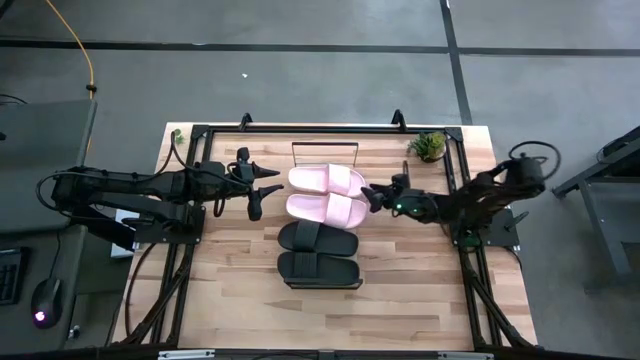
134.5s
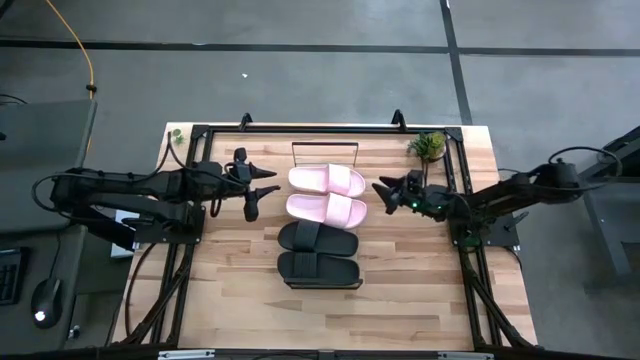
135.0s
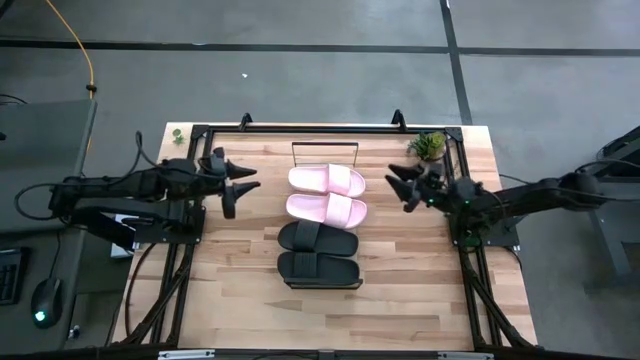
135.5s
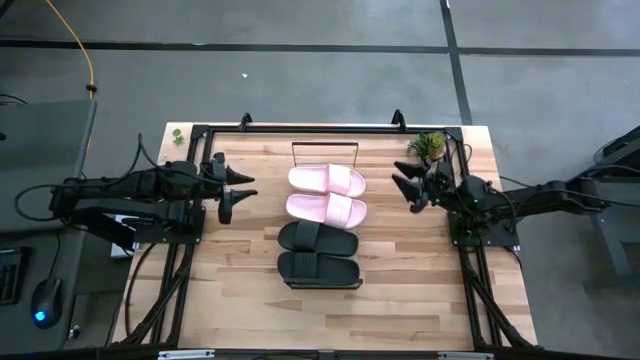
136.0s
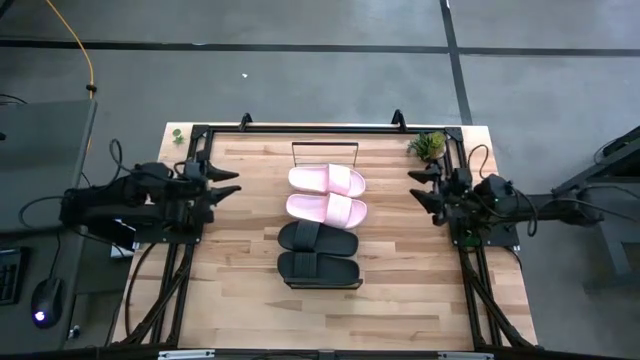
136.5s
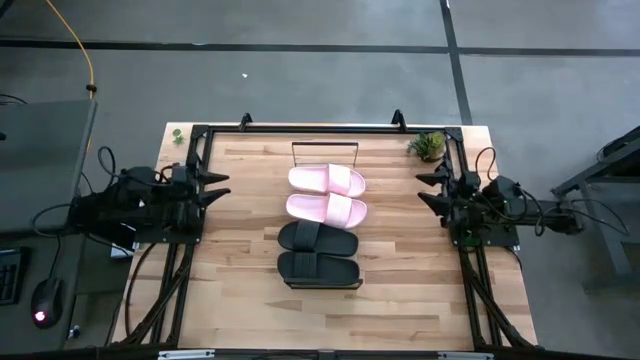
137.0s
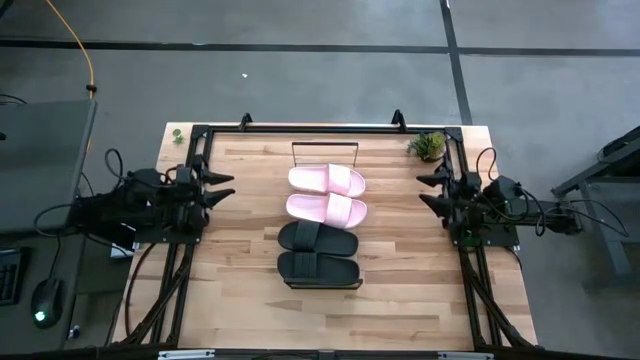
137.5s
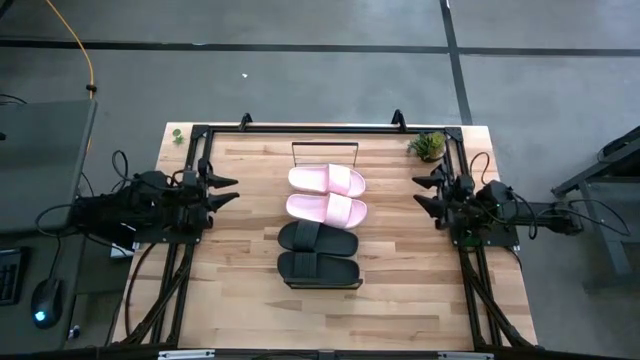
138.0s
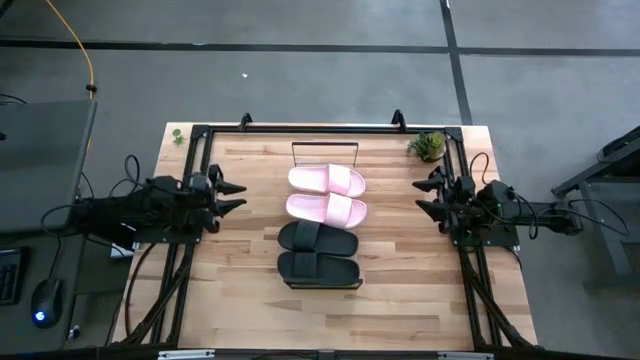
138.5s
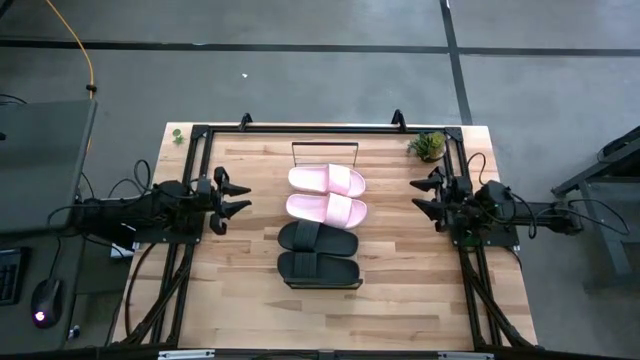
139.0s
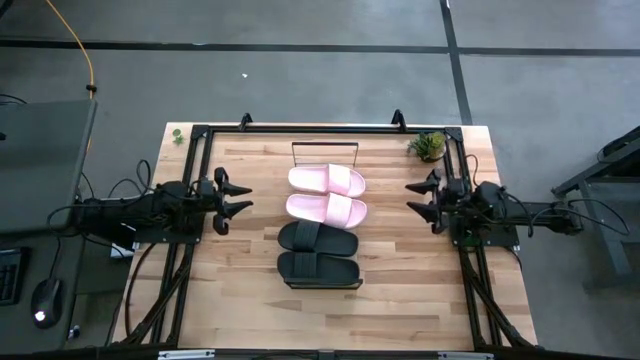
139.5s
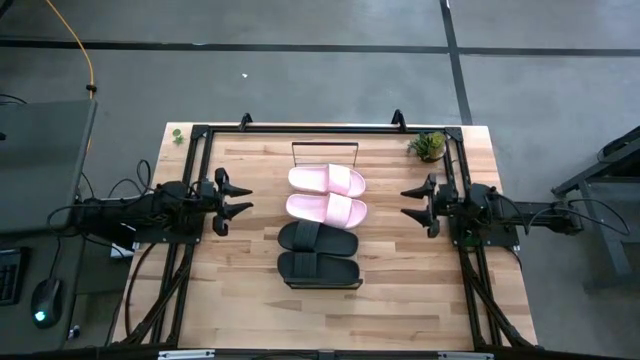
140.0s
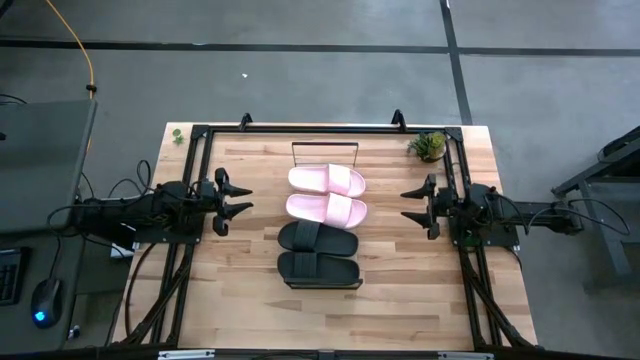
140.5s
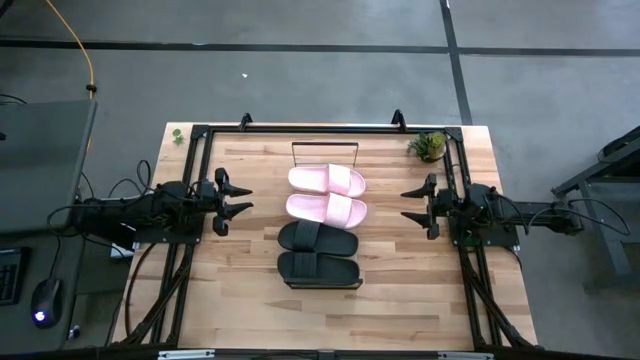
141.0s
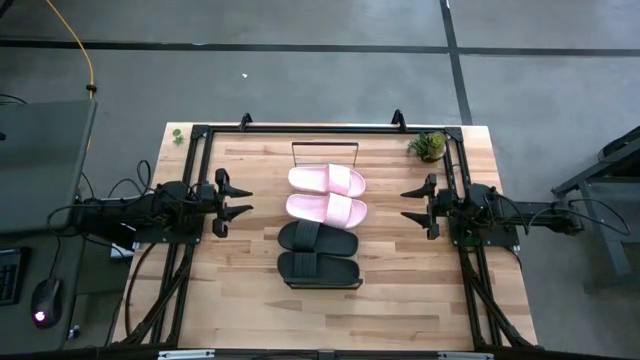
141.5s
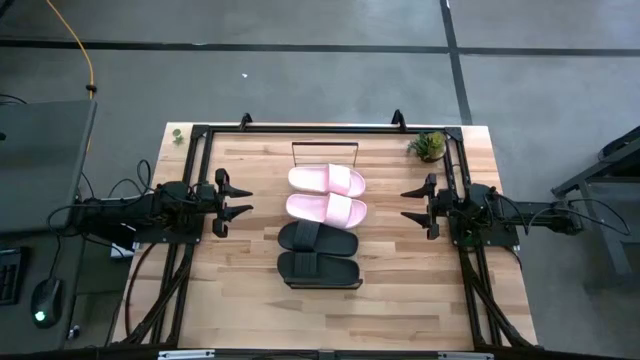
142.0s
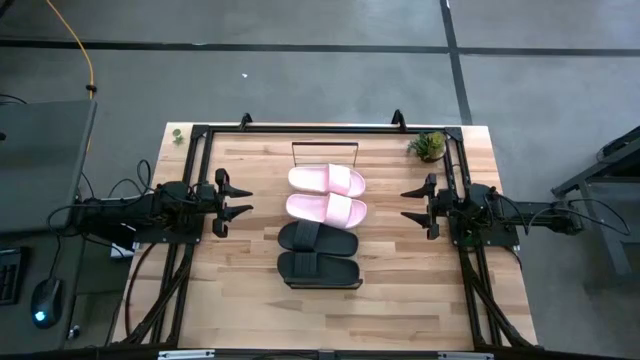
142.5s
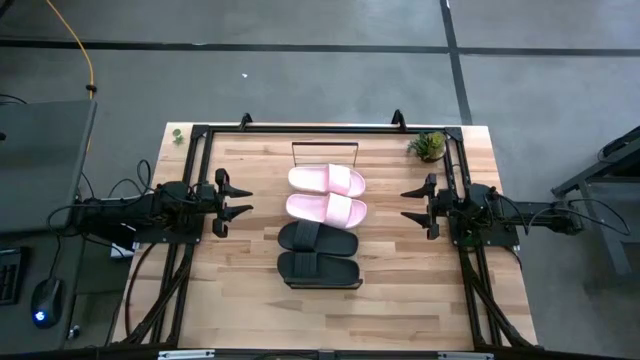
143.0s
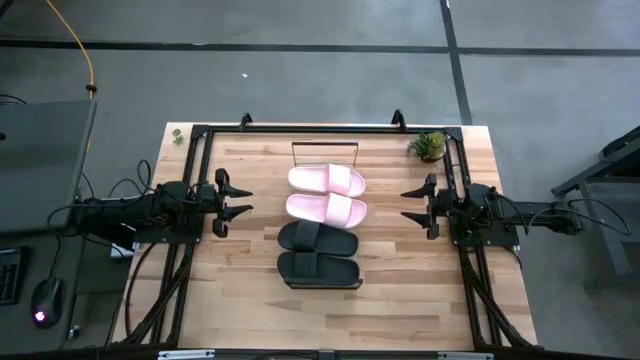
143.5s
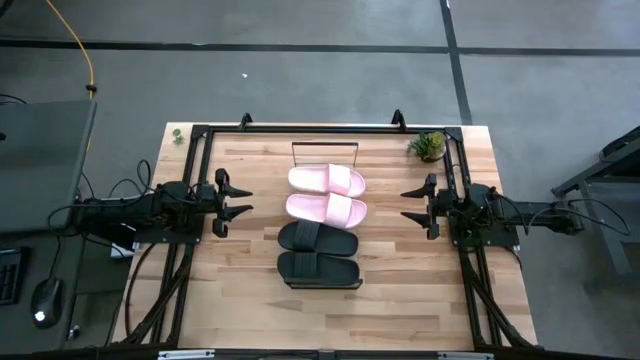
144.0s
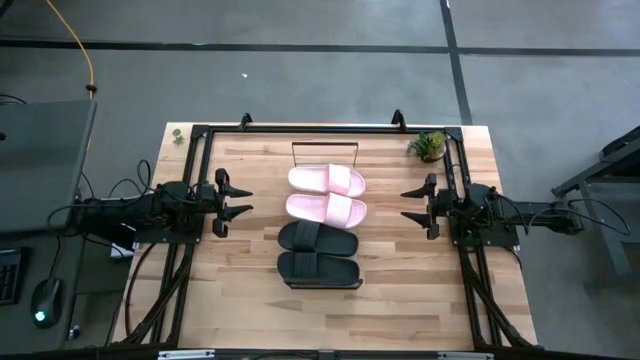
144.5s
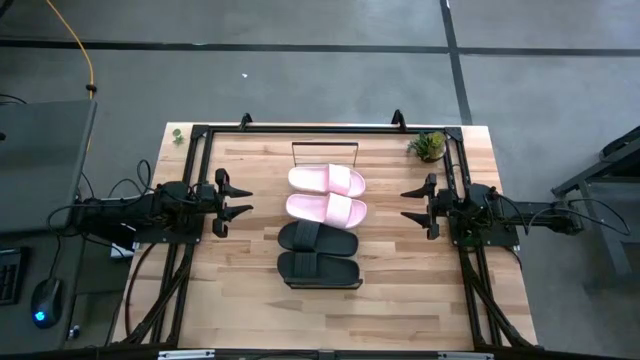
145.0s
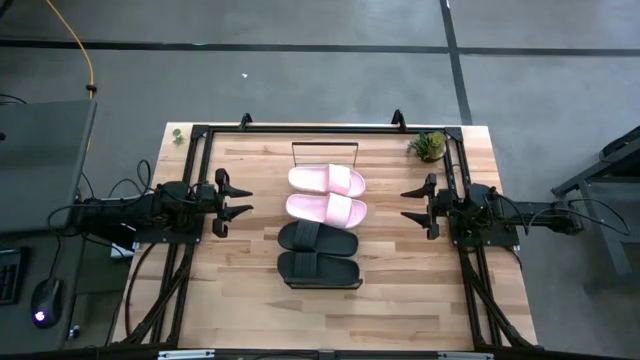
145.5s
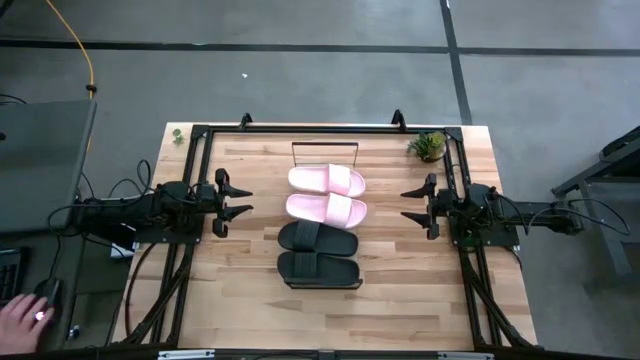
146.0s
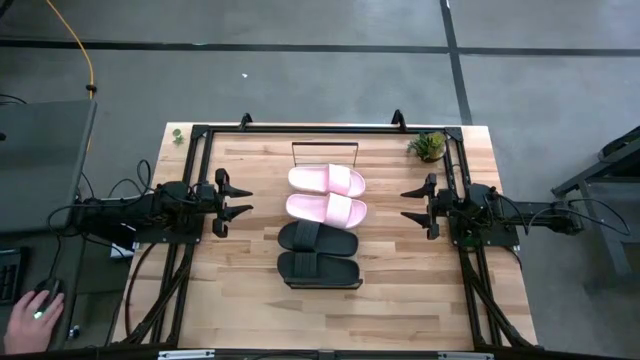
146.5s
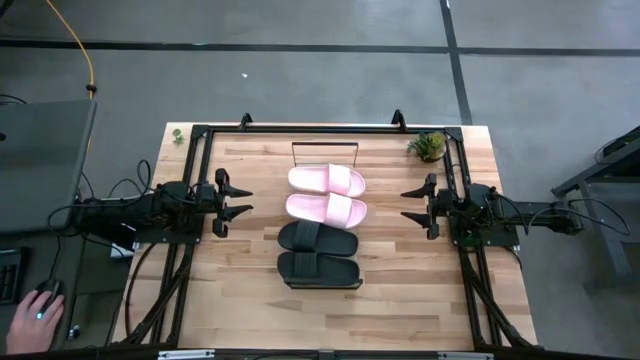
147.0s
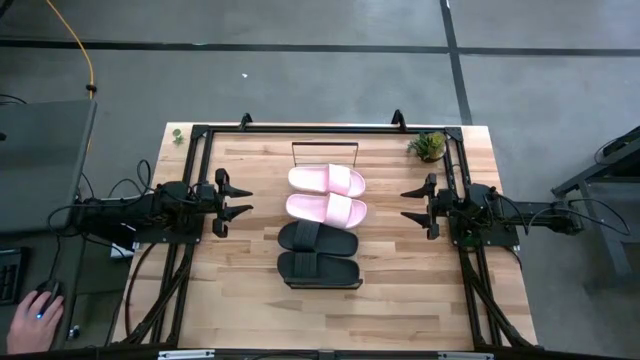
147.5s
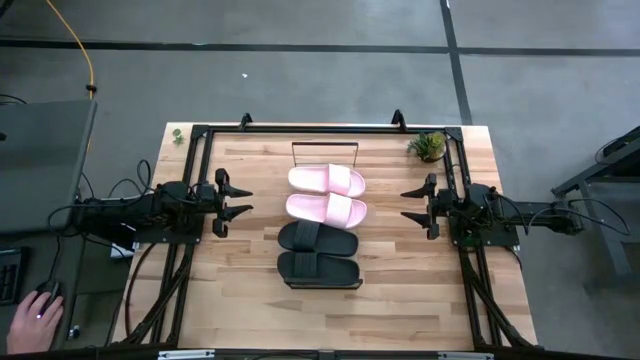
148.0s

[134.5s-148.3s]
Task: Pick and place slides into the shelf
Return to Home Position

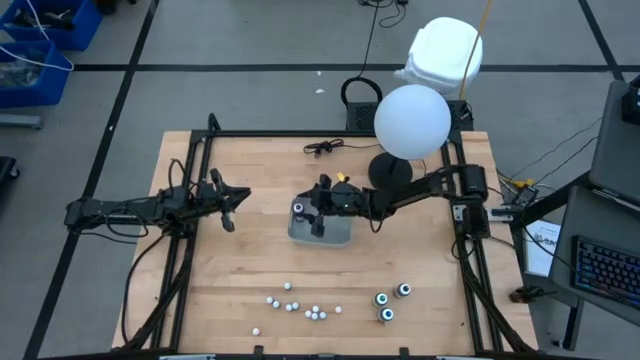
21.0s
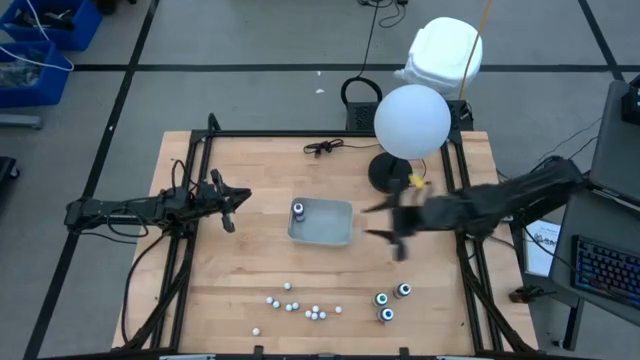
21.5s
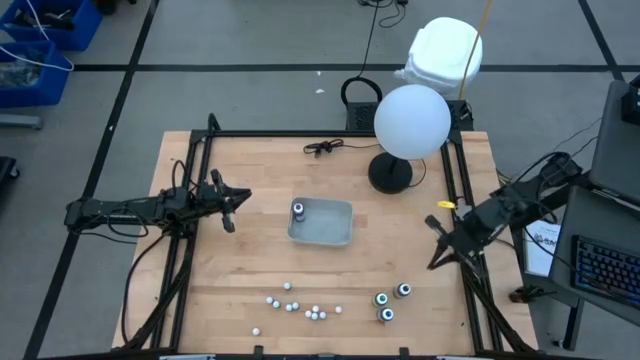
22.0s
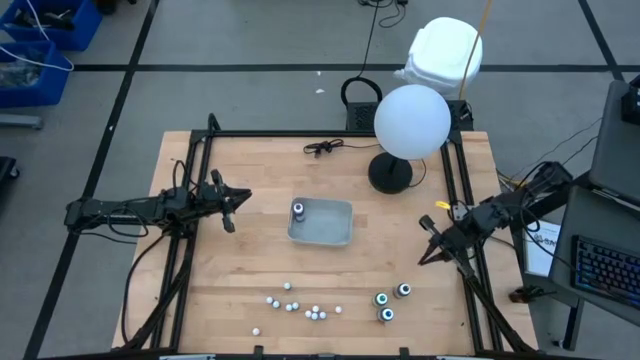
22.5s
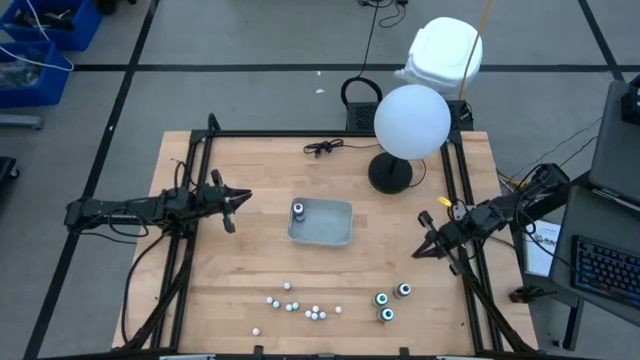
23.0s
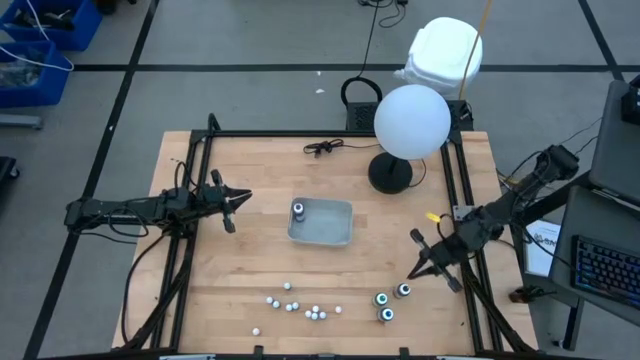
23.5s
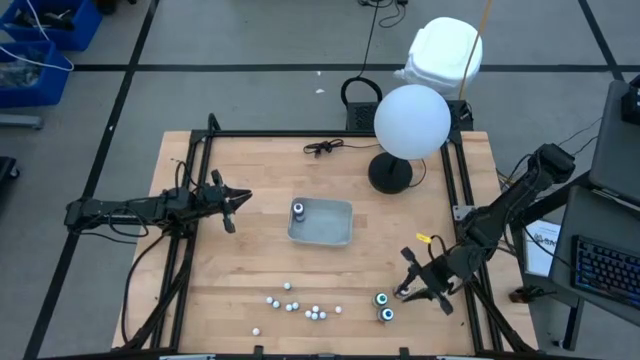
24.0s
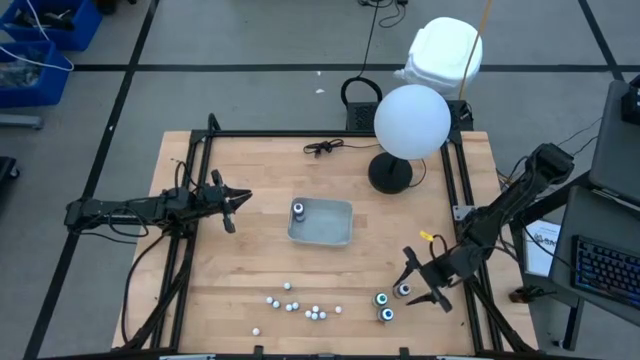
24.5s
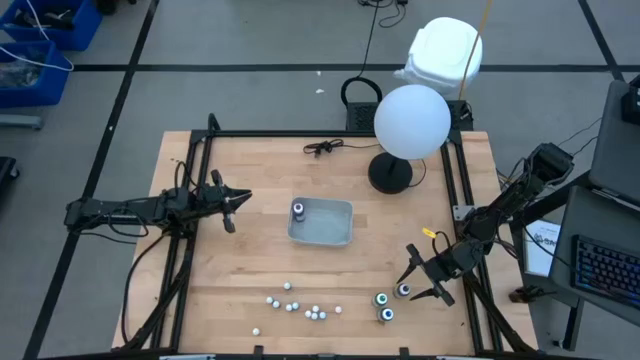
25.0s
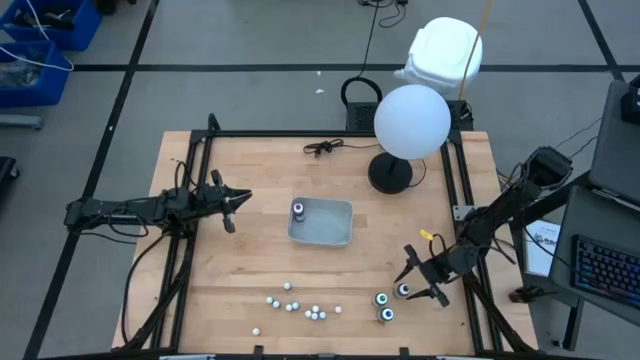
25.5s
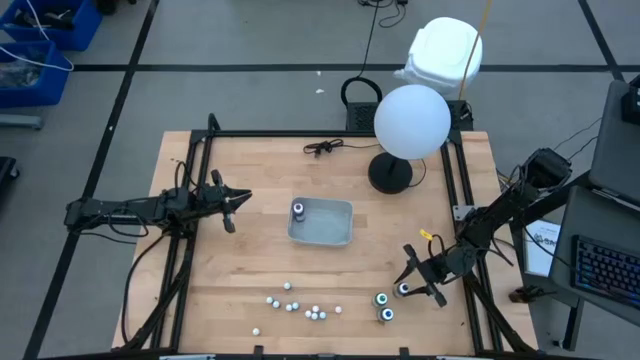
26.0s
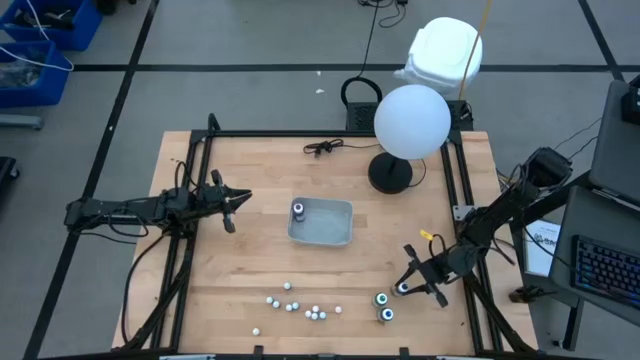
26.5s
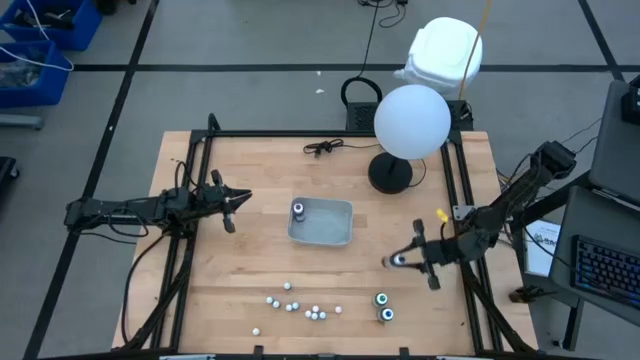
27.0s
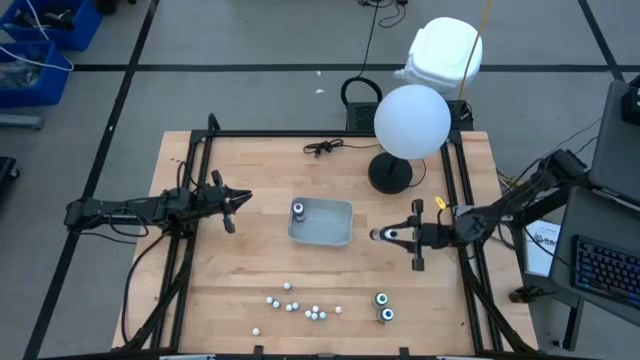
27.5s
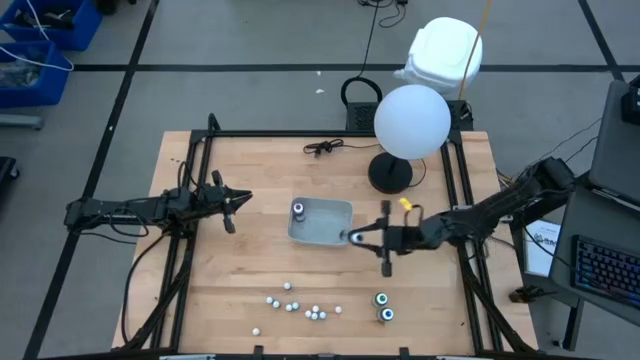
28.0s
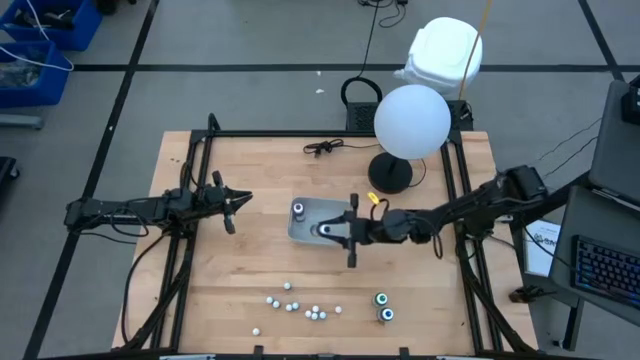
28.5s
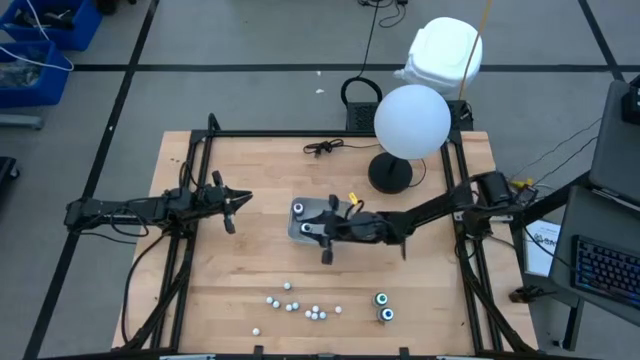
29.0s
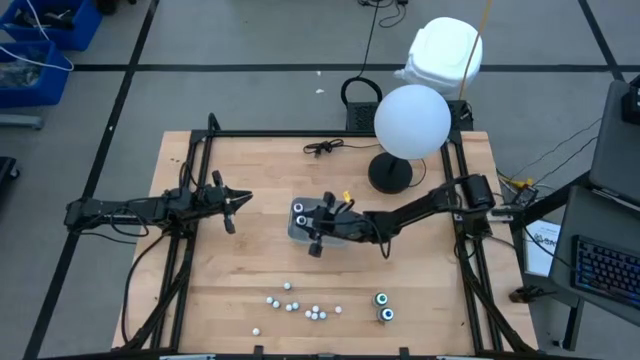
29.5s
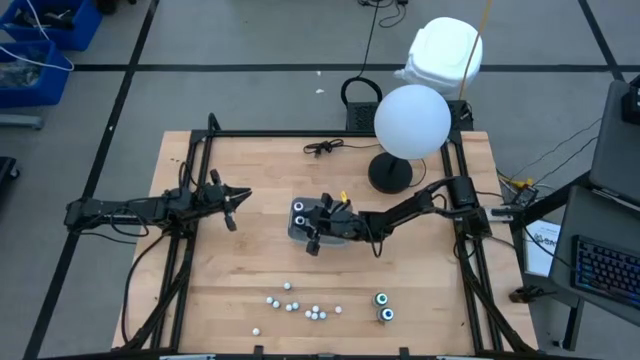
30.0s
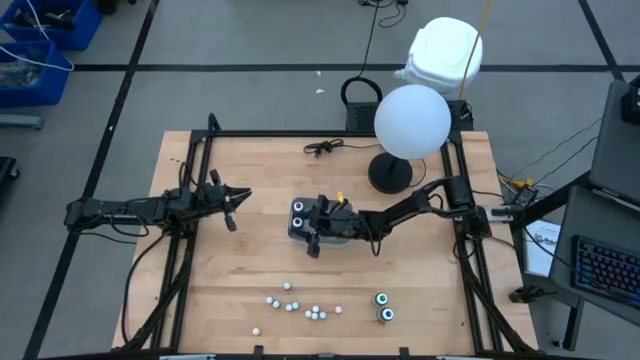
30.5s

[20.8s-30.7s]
Task: Pick & Place food coloring
Put the large black food coloring bottle into the gray bin
